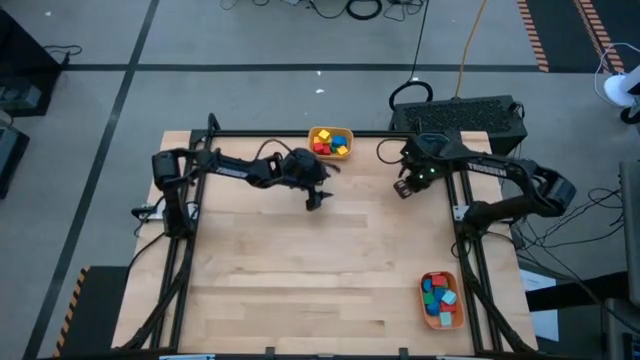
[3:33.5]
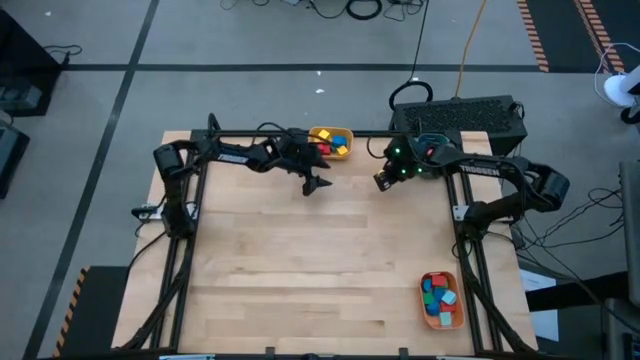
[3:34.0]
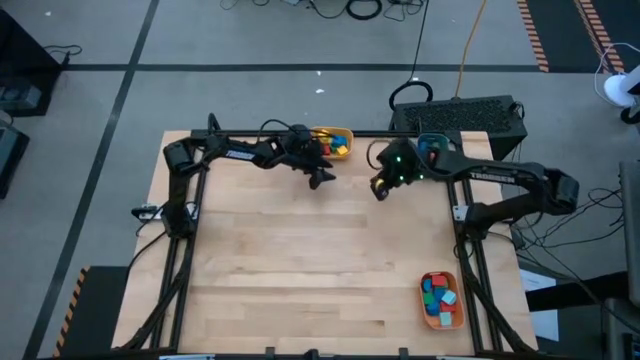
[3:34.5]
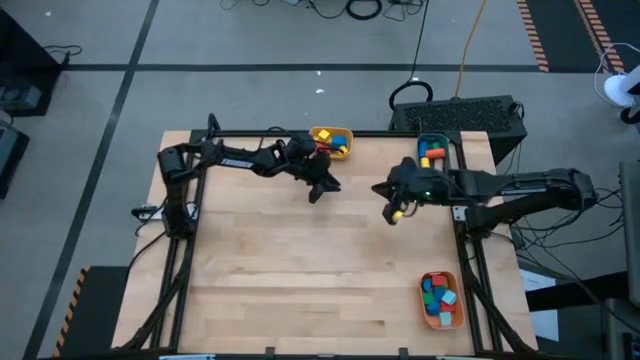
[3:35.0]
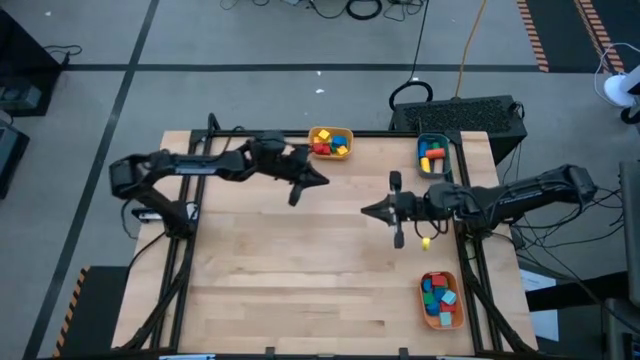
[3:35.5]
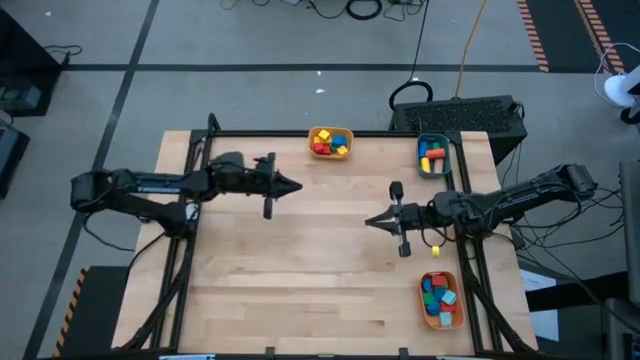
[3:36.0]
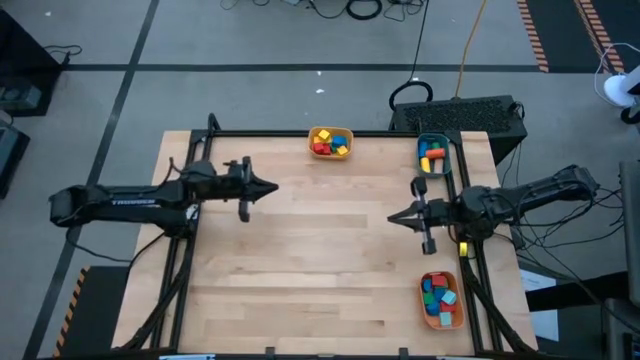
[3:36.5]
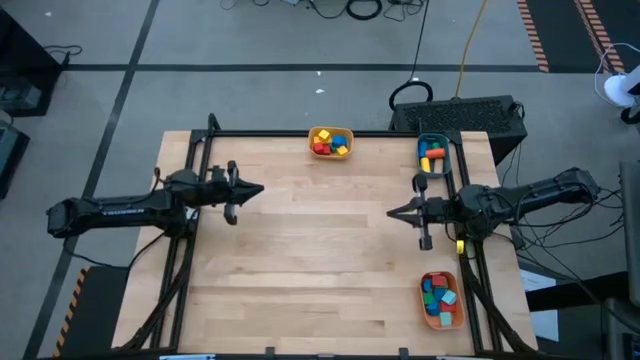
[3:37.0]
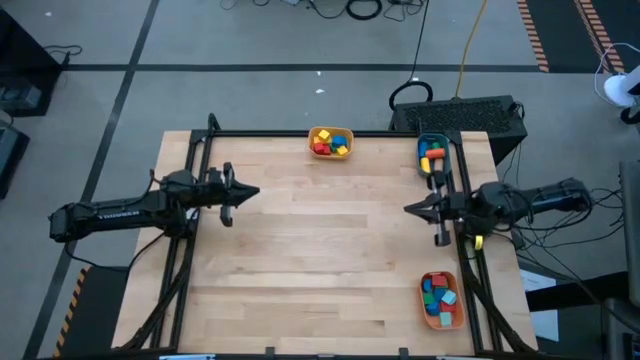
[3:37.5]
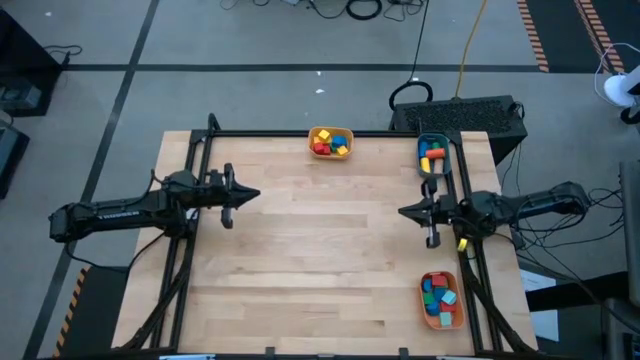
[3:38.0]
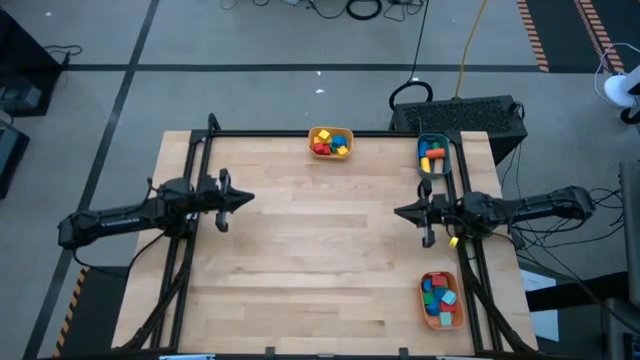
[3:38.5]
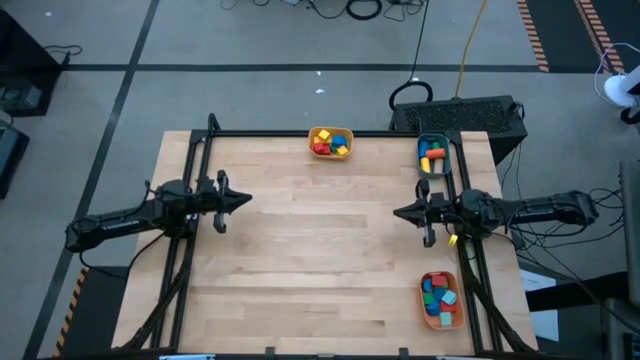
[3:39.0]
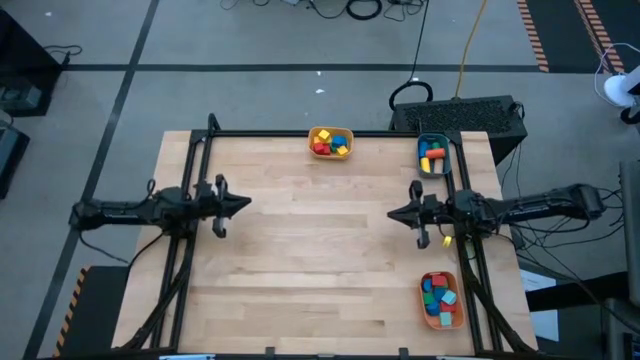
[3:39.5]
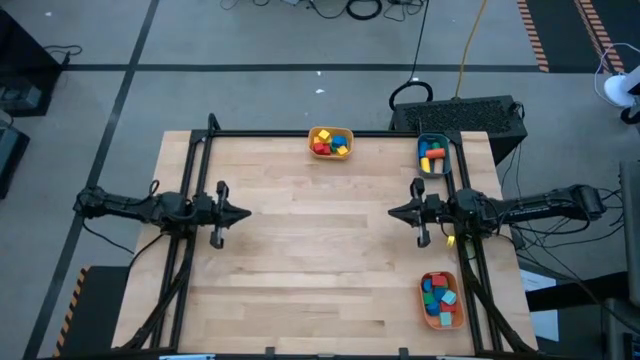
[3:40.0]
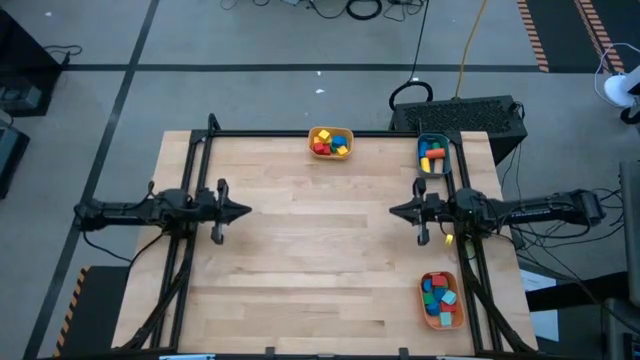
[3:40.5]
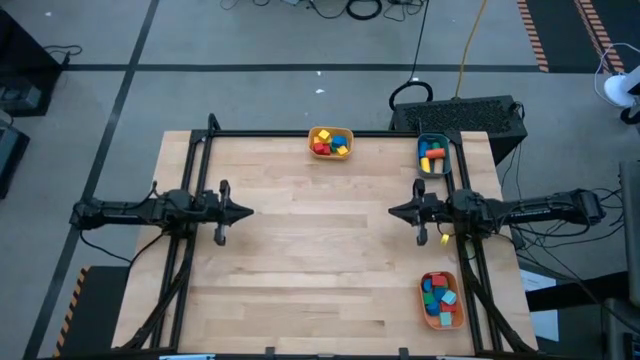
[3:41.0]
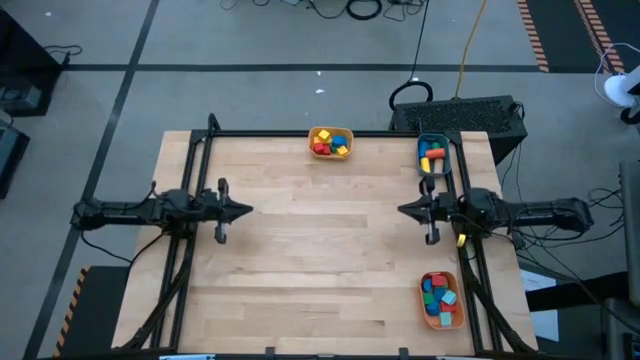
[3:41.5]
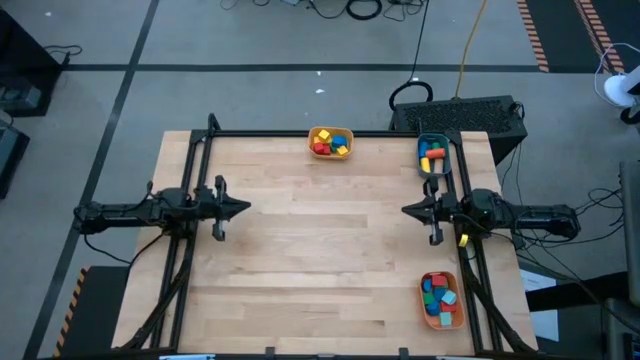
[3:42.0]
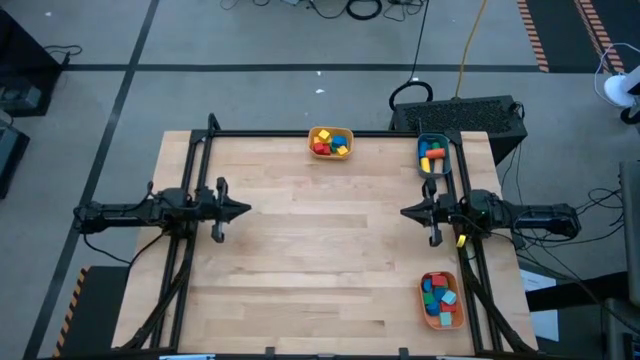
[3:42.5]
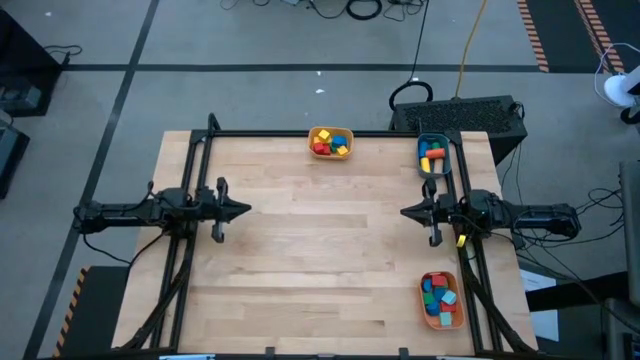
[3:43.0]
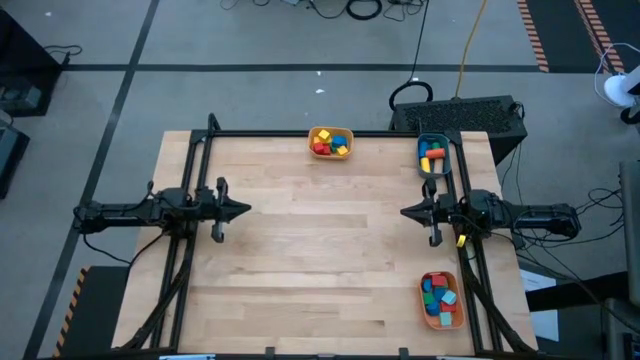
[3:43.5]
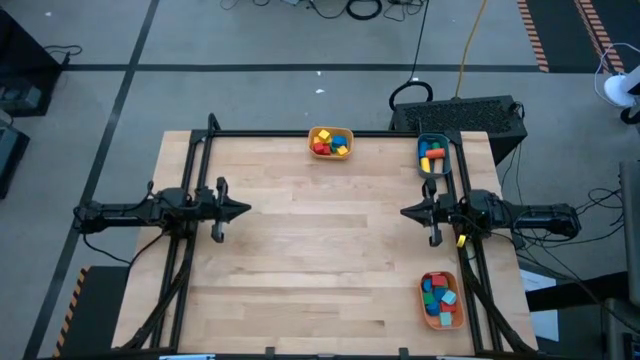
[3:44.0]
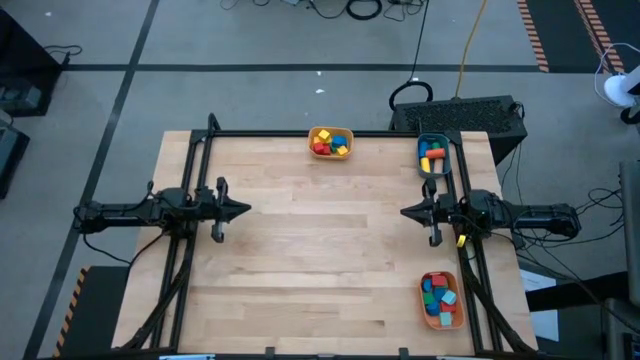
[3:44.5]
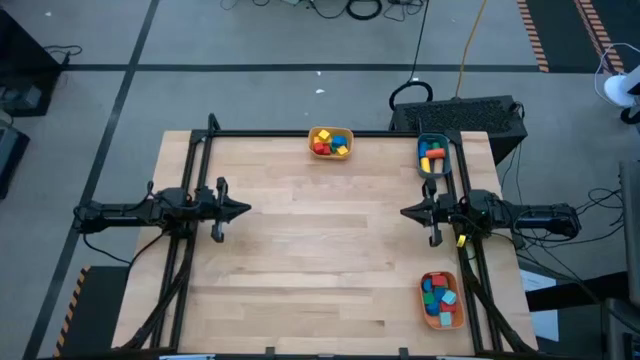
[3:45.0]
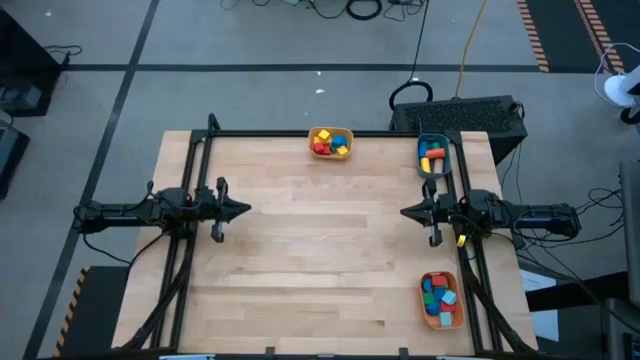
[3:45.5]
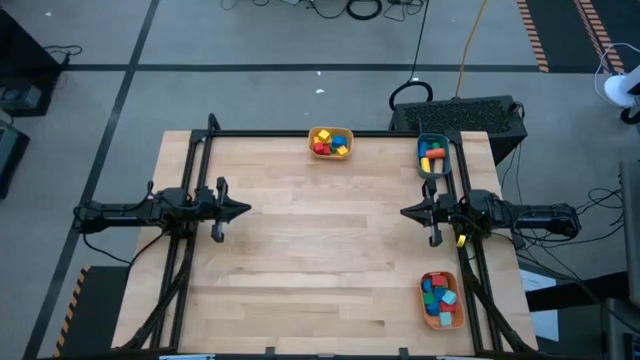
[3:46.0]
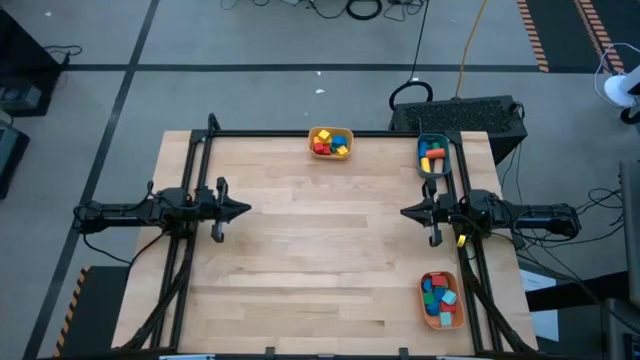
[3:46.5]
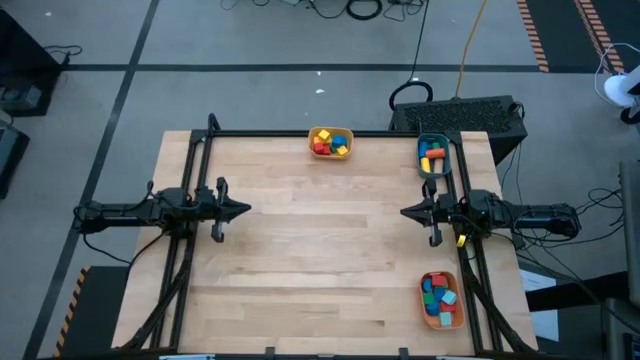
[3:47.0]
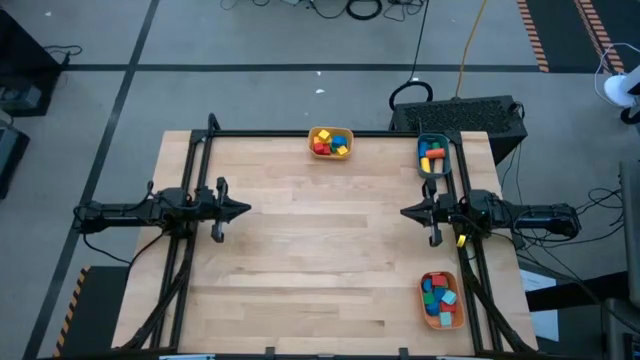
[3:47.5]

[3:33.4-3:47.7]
Task: Sort blocks by size
Return to Home Position

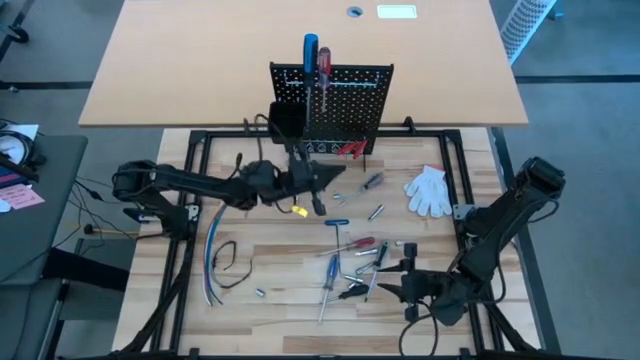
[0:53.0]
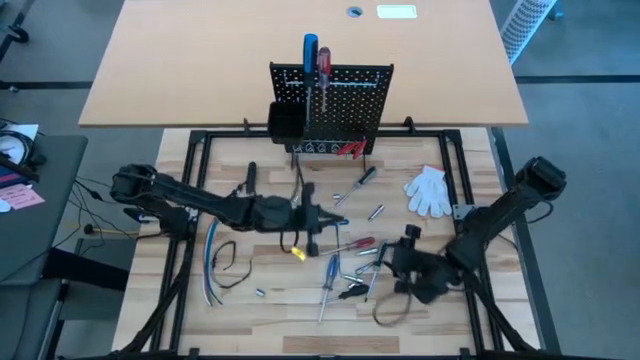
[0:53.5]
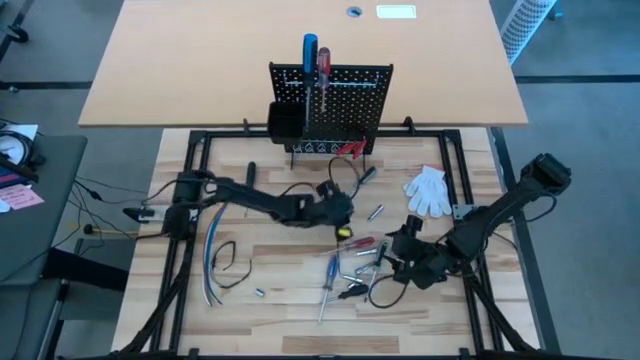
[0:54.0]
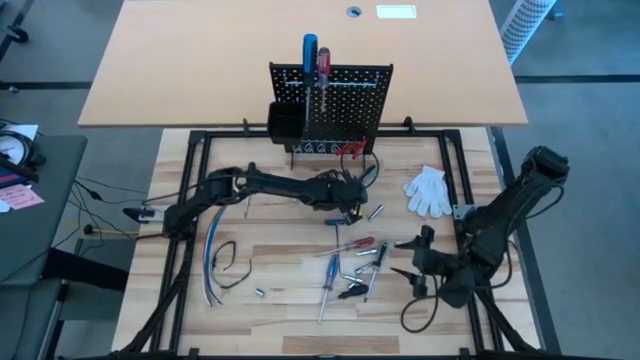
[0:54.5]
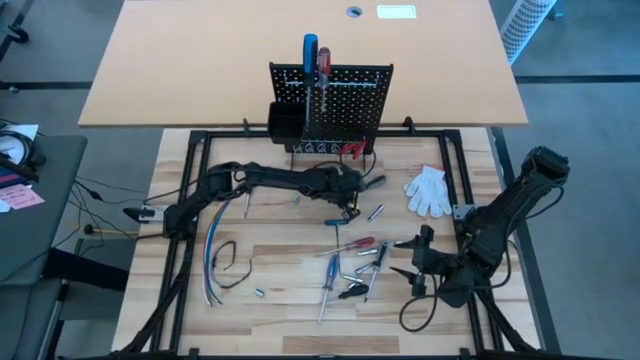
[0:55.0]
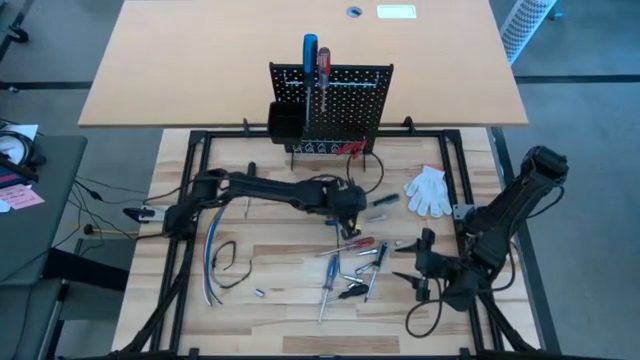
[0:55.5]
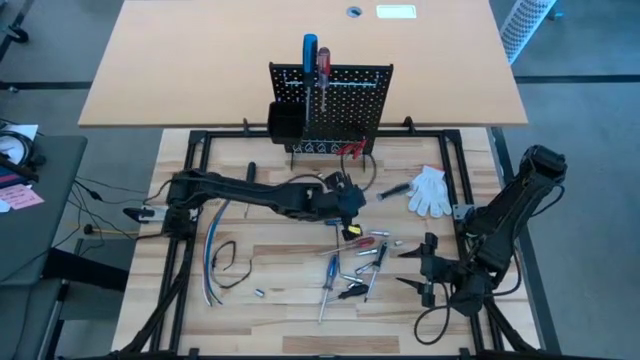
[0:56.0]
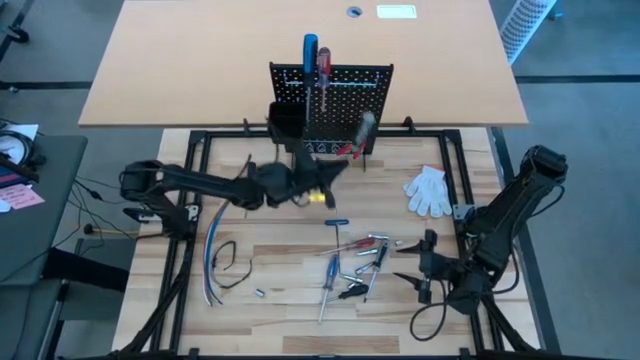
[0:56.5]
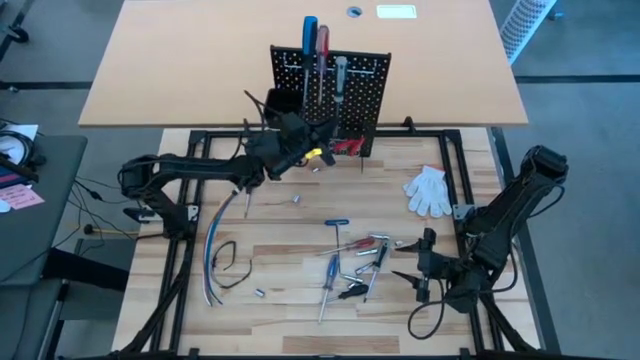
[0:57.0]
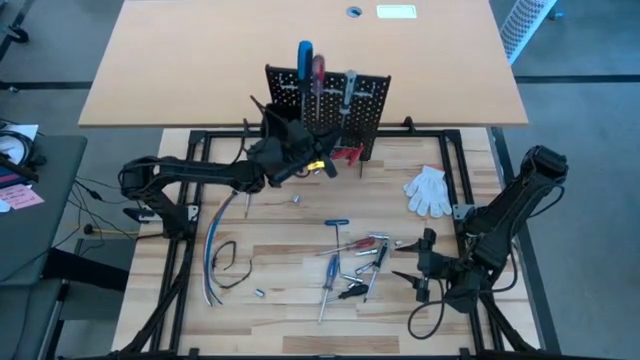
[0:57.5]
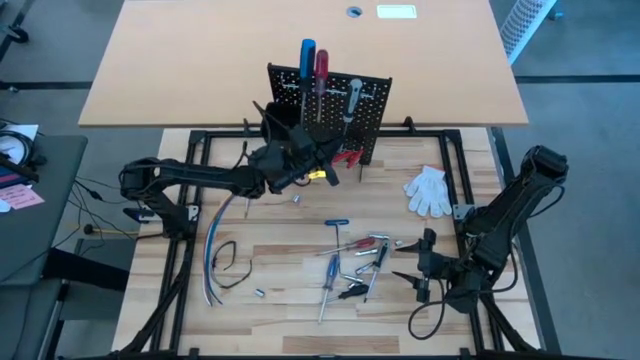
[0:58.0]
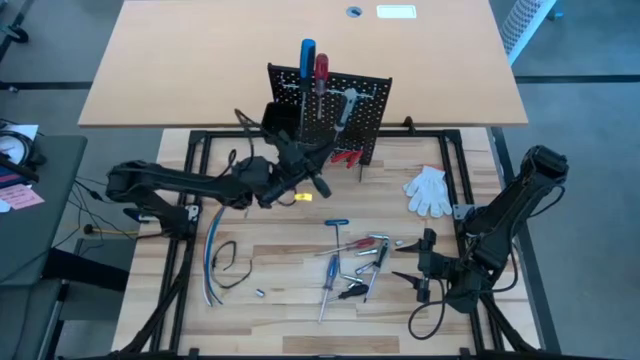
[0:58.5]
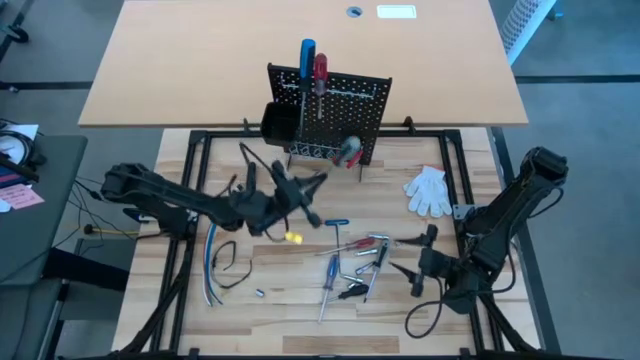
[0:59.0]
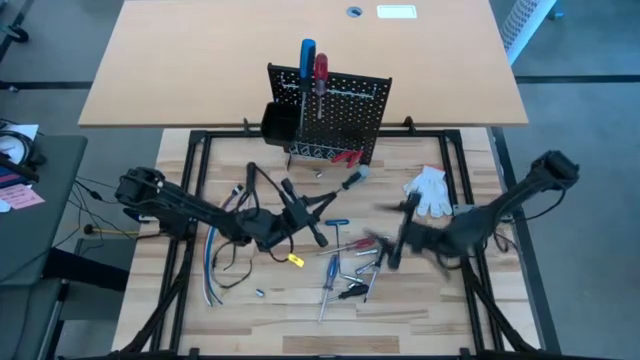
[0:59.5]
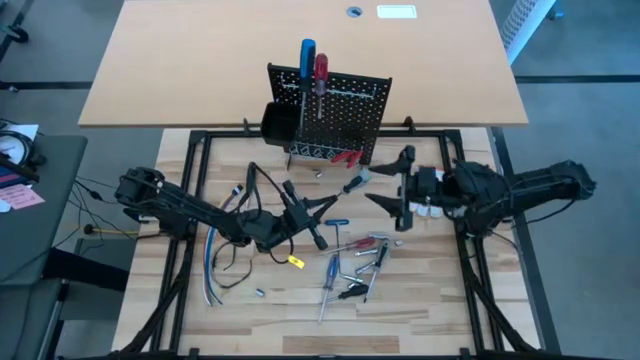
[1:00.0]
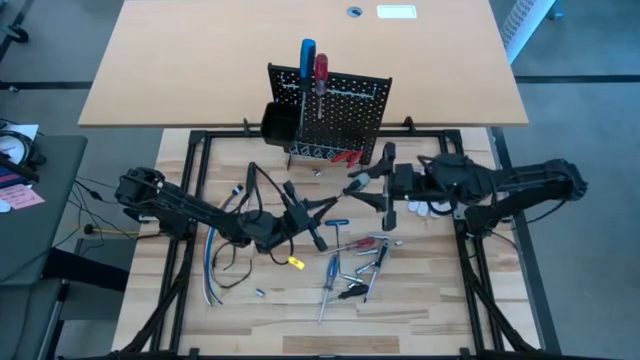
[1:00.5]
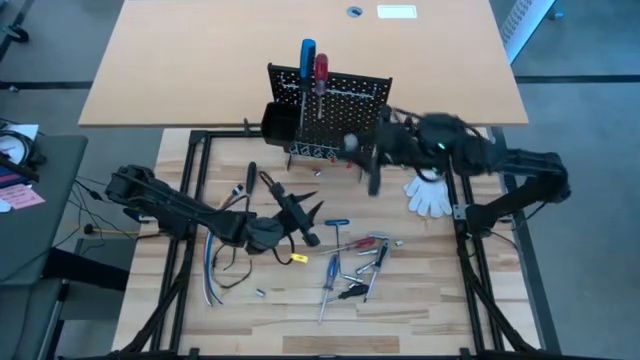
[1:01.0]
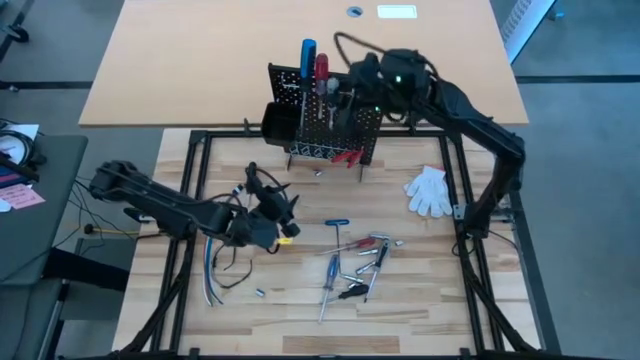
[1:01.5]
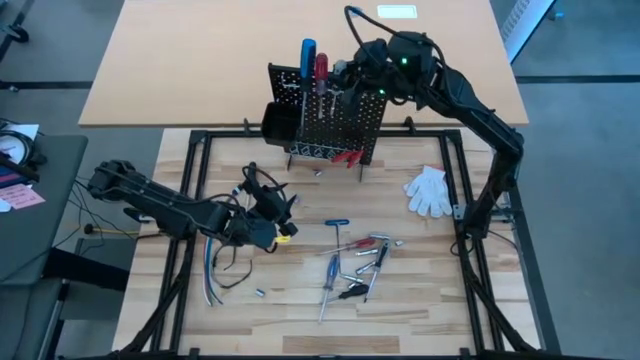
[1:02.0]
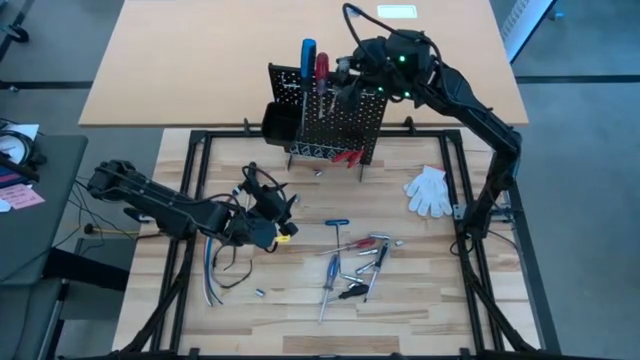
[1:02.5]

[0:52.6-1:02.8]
Task: Hang tools onto peg board
Hang the gray screwdriver on the black pegboard
